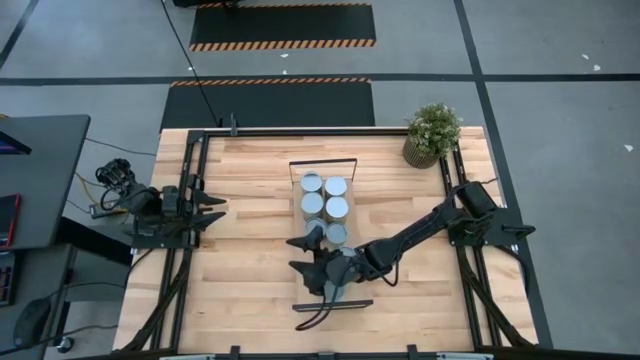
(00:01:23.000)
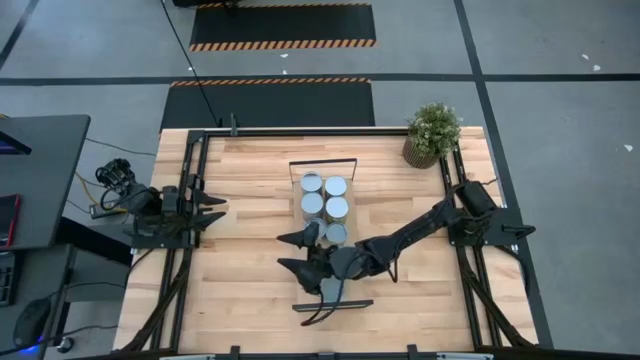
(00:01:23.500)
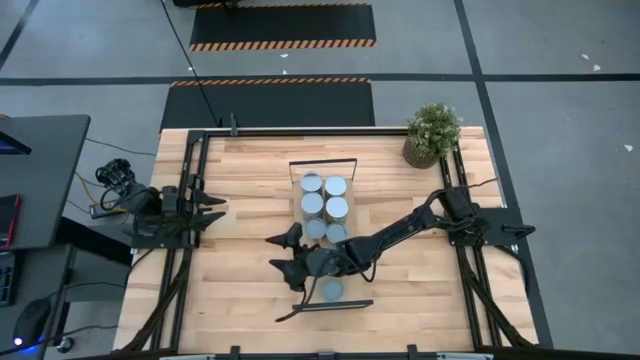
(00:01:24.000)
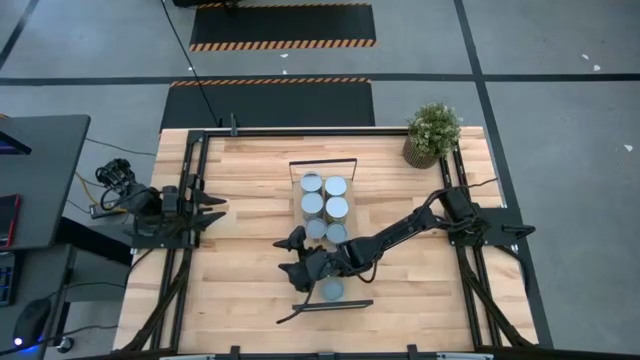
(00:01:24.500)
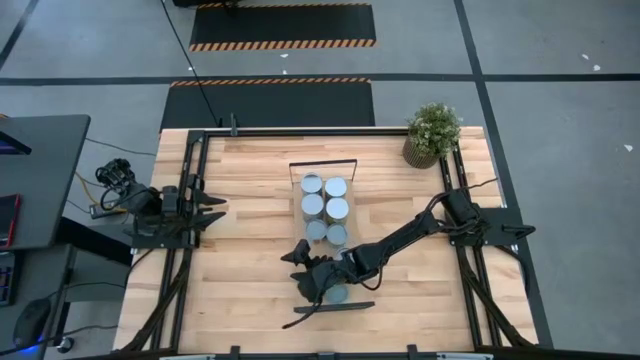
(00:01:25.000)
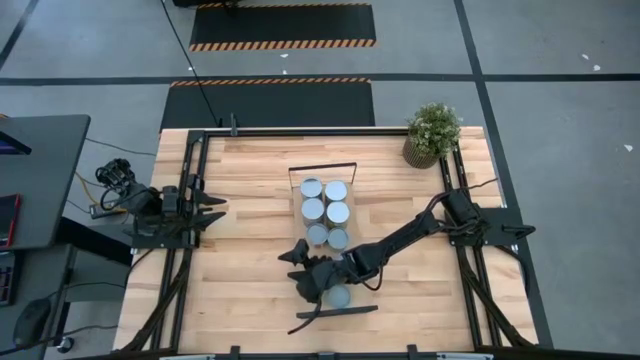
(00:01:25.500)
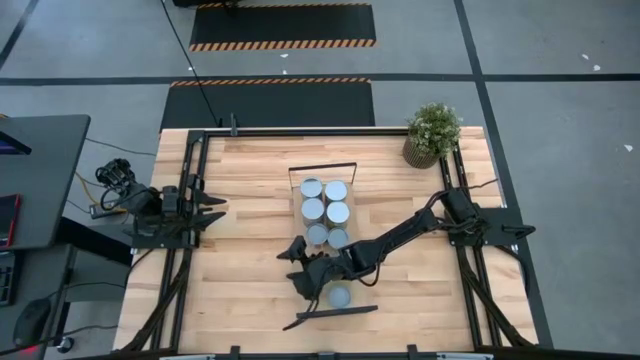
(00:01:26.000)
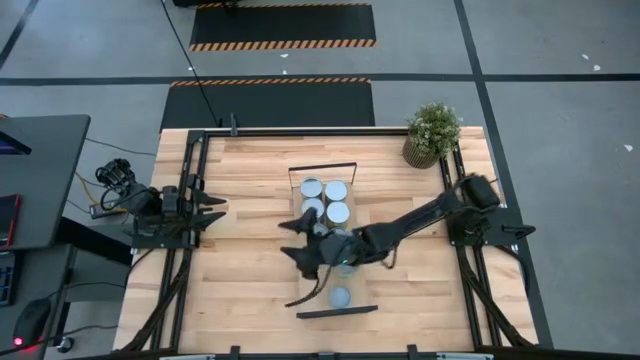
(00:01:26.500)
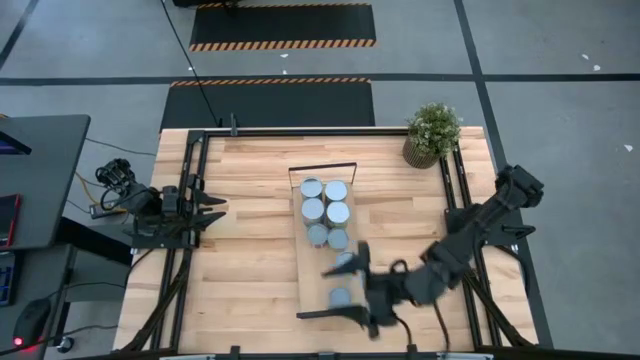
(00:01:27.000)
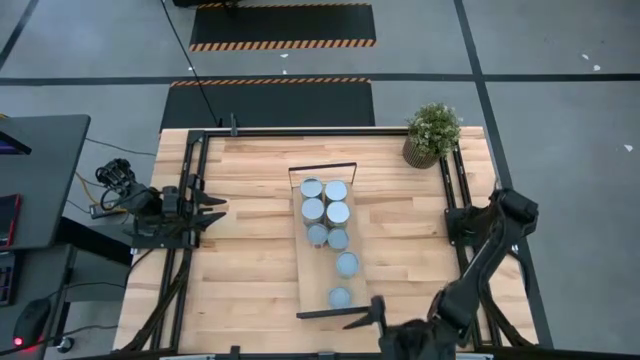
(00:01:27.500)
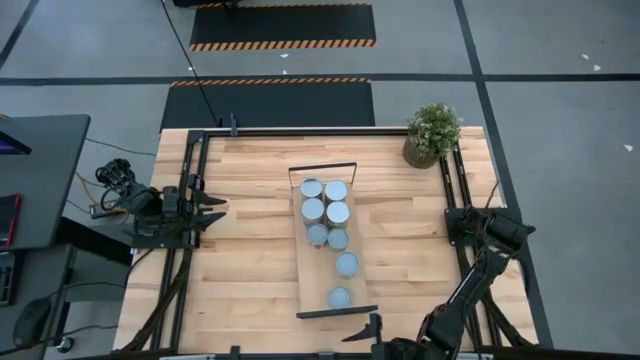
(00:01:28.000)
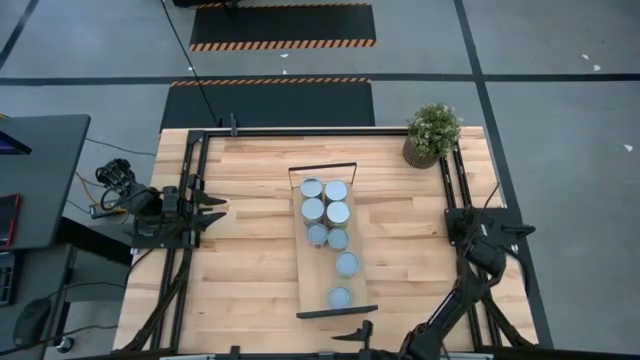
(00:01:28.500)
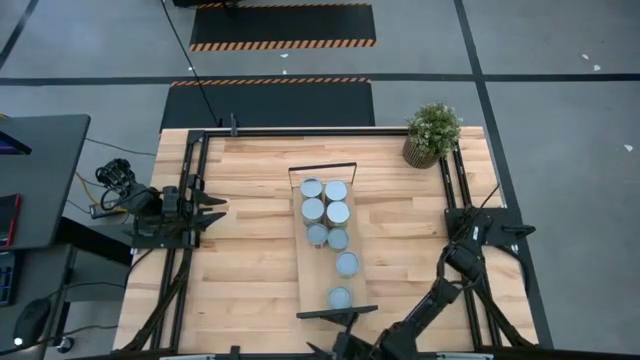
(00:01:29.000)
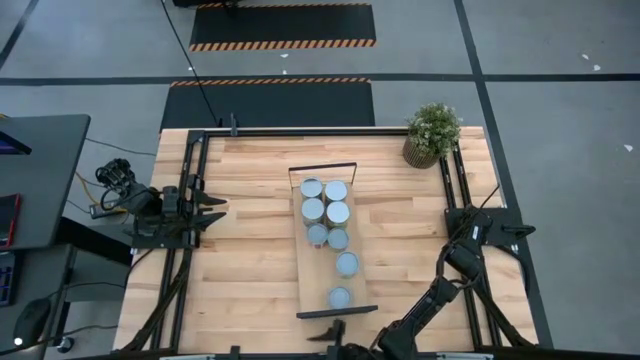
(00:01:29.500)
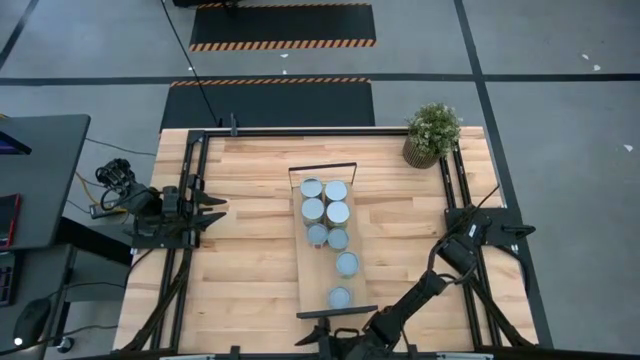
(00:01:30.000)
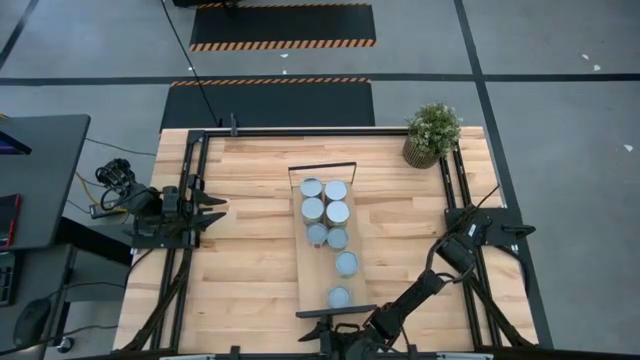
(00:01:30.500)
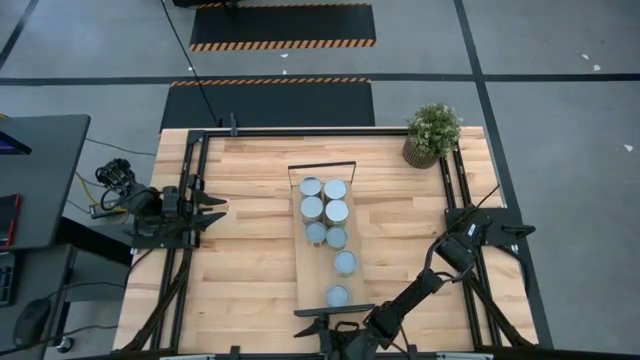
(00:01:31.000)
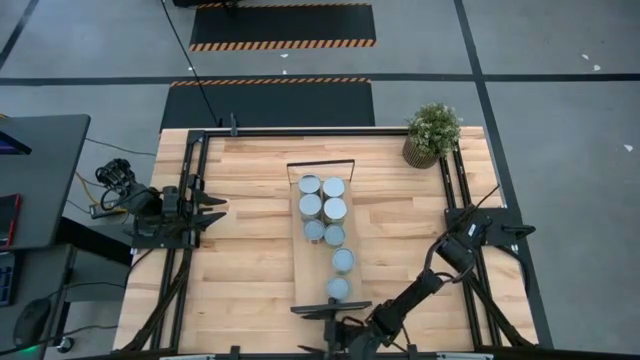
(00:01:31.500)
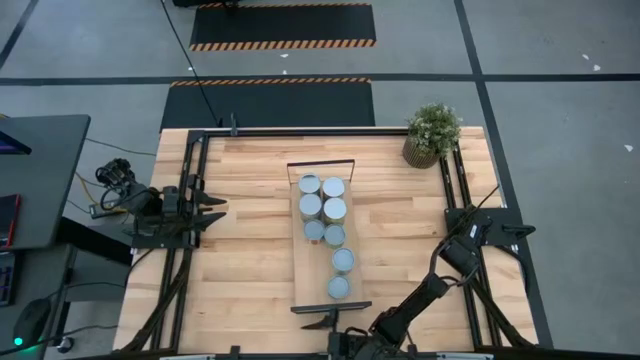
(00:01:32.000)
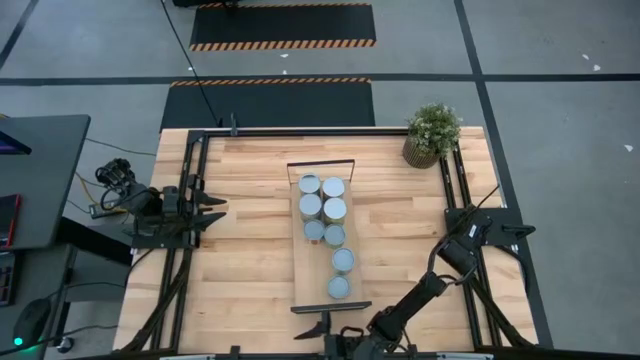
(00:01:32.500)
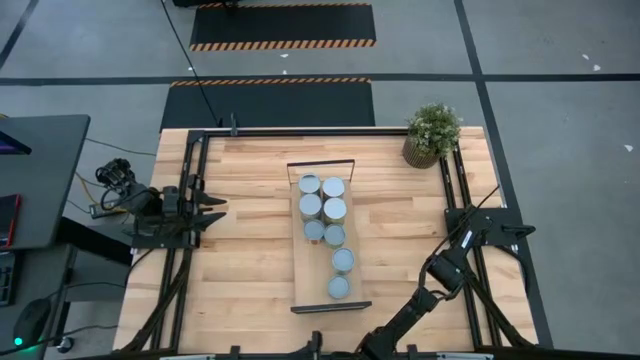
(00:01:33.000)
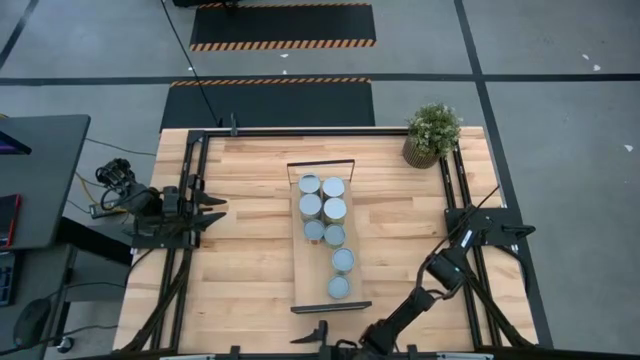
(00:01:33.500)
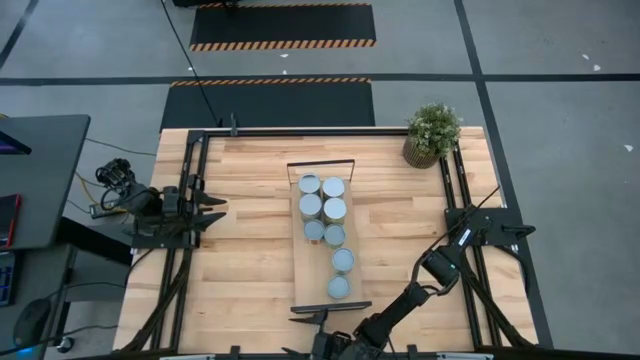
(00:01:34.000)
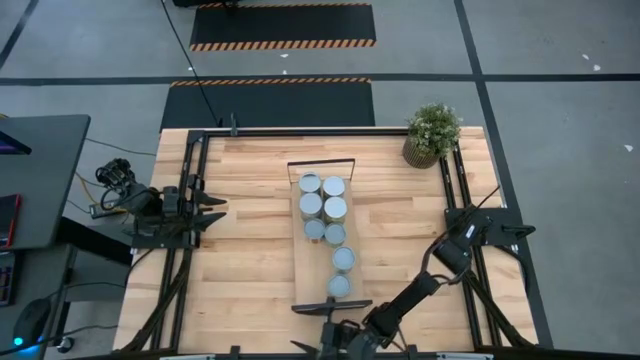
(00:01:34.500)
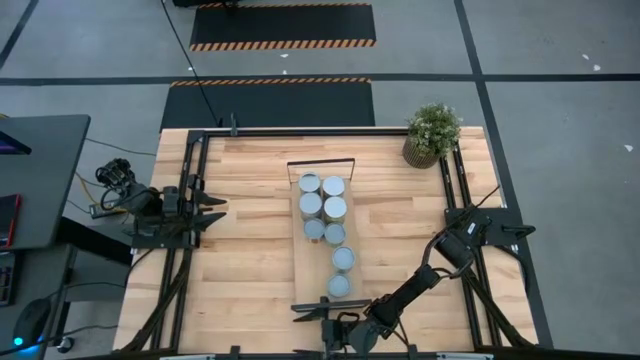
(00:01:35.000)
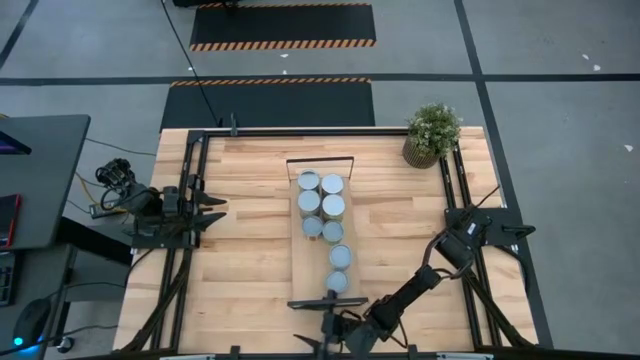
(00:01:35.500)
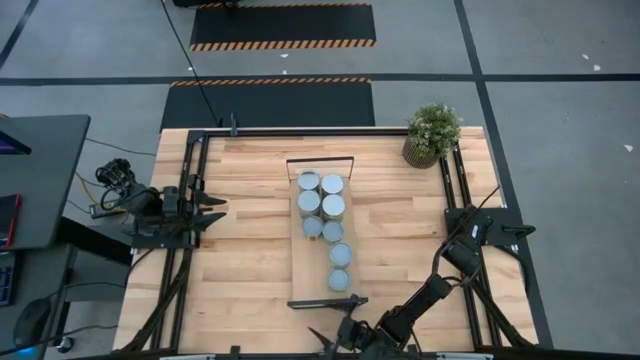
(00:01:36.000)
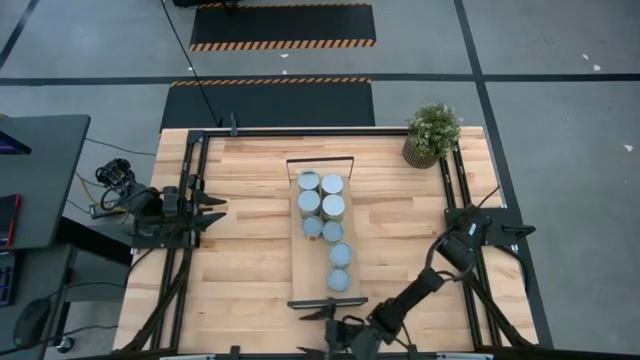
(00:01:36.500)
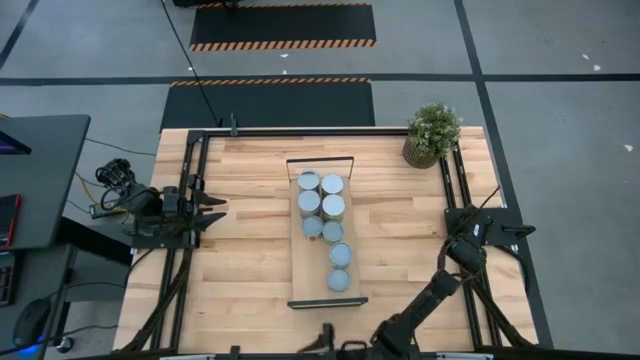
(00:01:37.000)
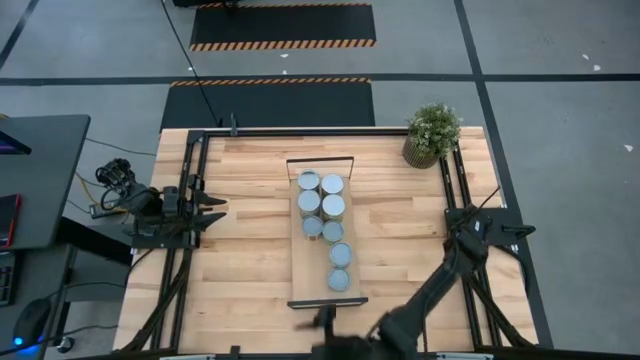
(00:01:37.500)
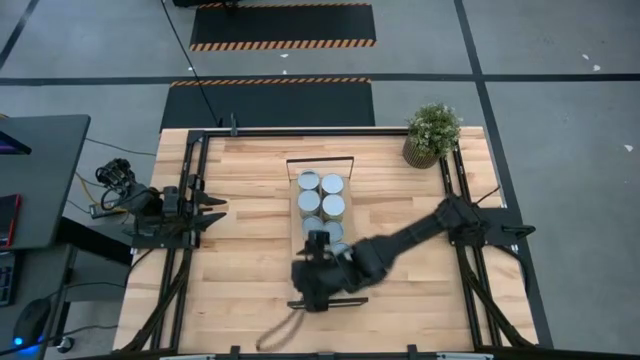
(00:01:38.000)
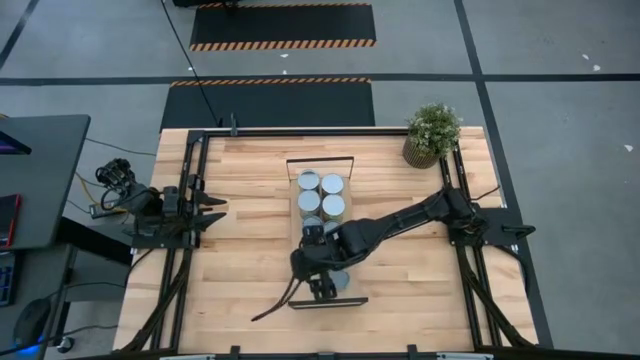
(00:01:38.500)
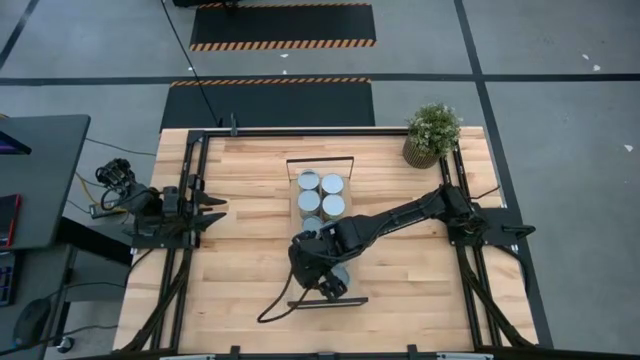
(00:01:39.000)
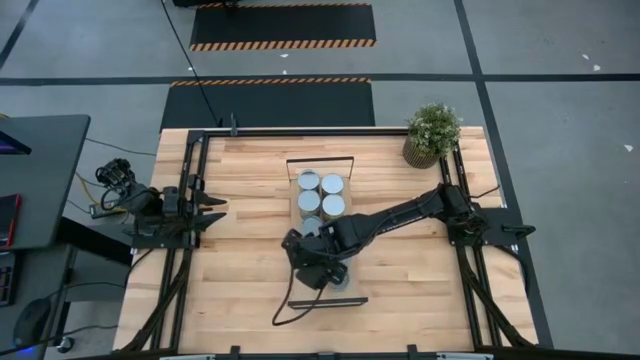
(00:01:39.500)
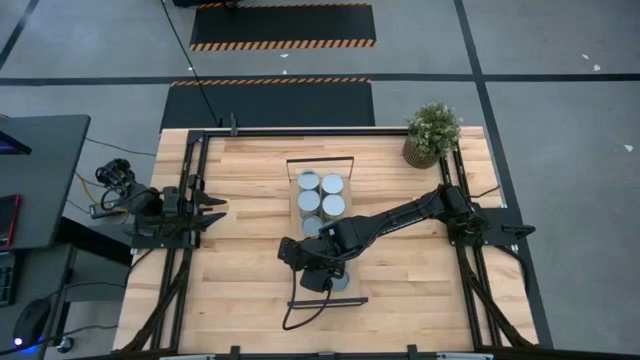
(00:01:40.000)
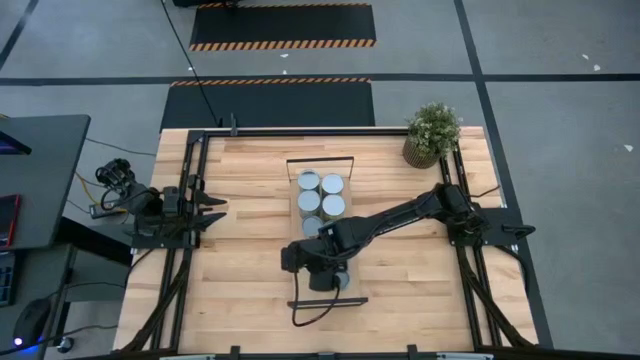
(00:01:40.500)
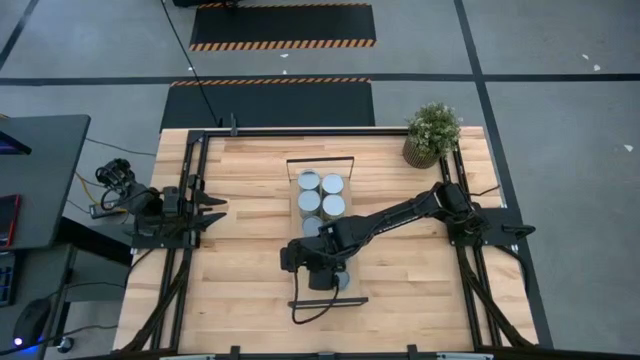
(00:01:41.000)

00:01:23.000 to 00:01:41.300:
Task: Pick and place cans onto a shelf
Put the canned tuna on the shelf
